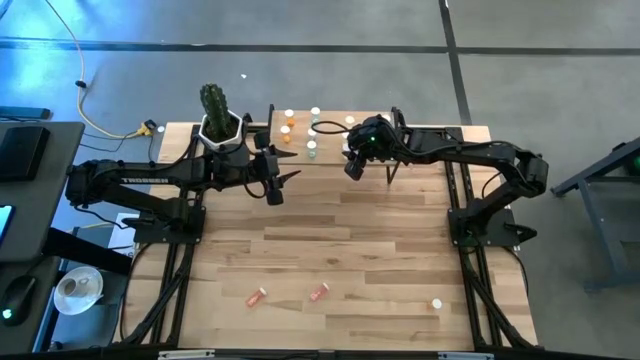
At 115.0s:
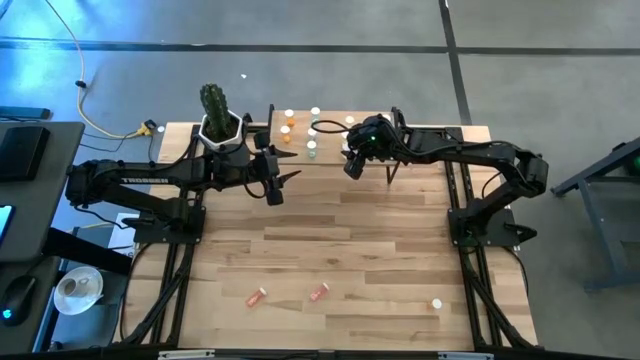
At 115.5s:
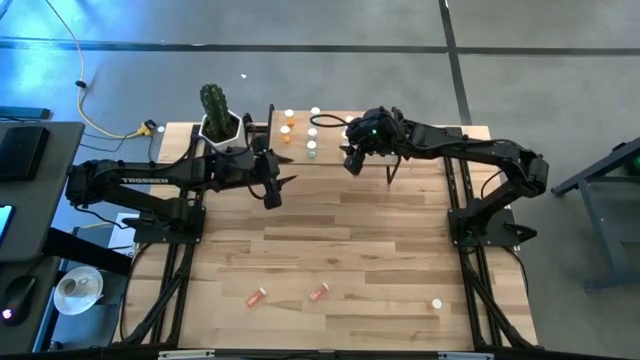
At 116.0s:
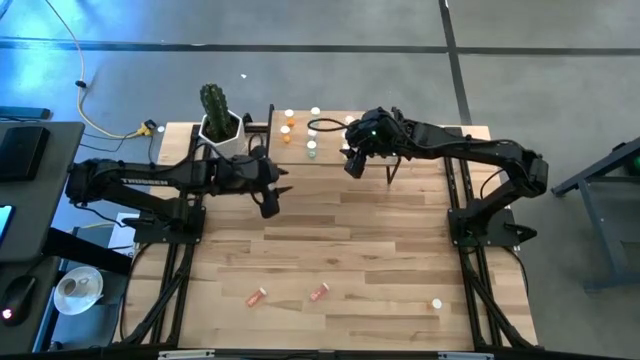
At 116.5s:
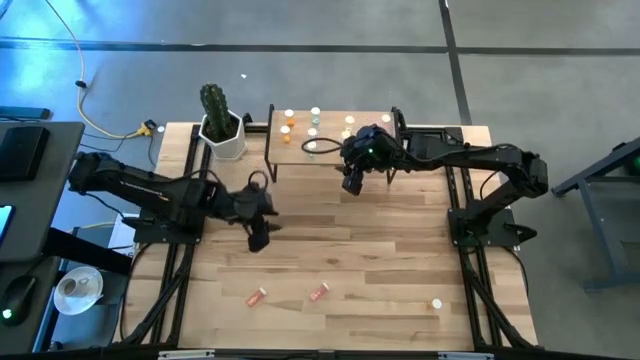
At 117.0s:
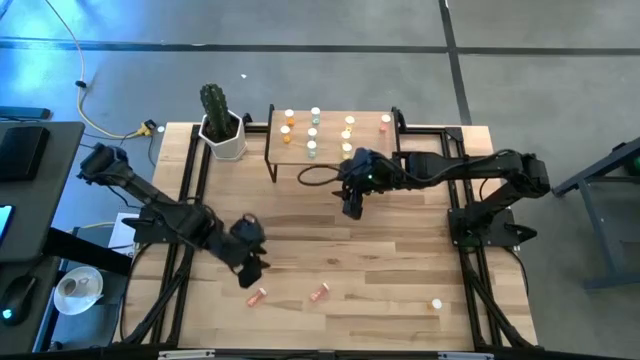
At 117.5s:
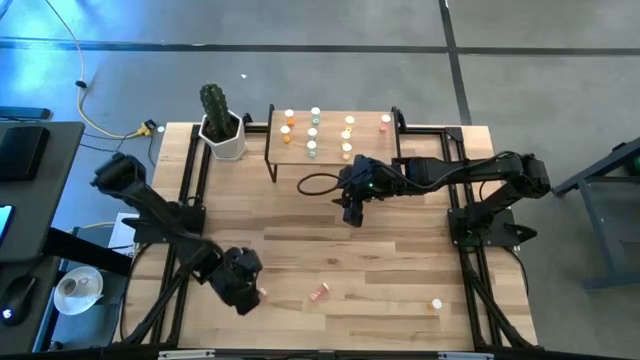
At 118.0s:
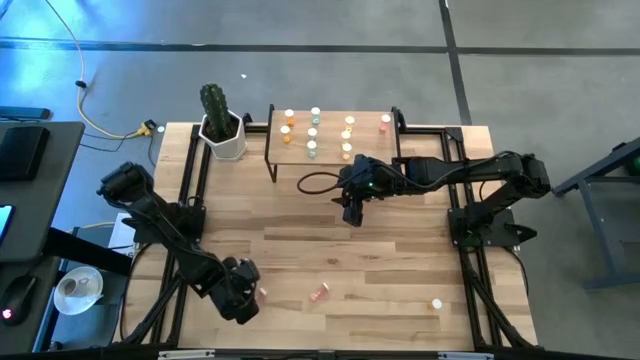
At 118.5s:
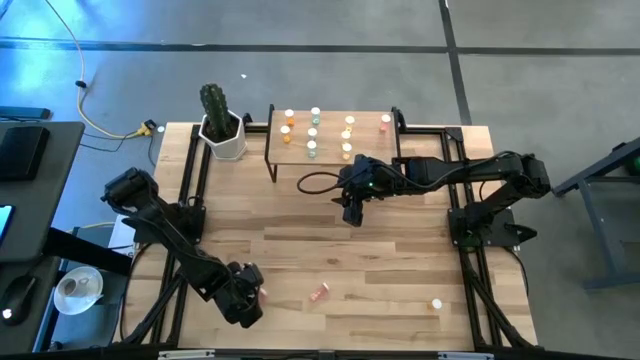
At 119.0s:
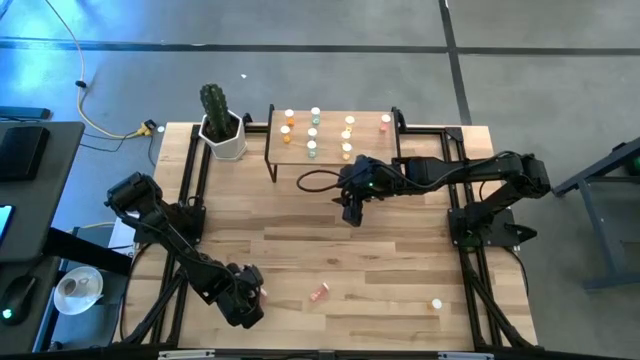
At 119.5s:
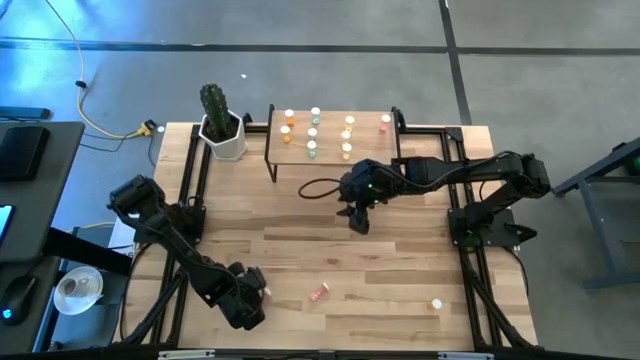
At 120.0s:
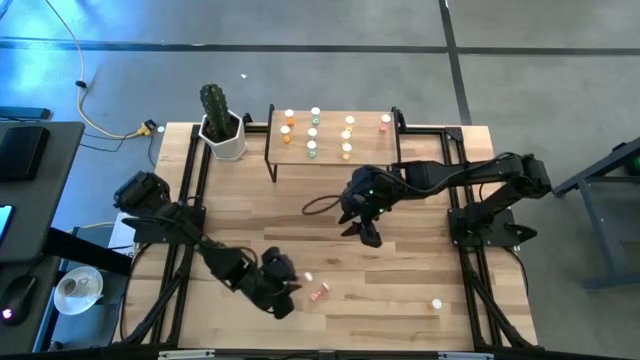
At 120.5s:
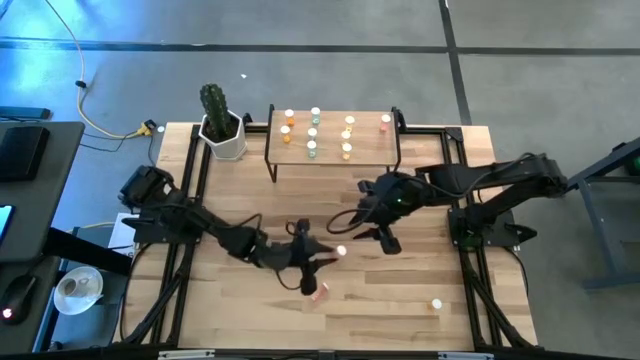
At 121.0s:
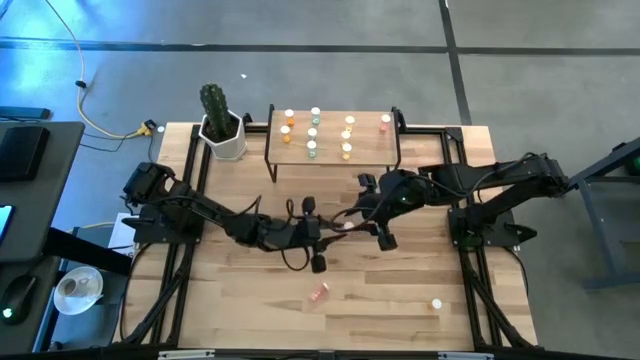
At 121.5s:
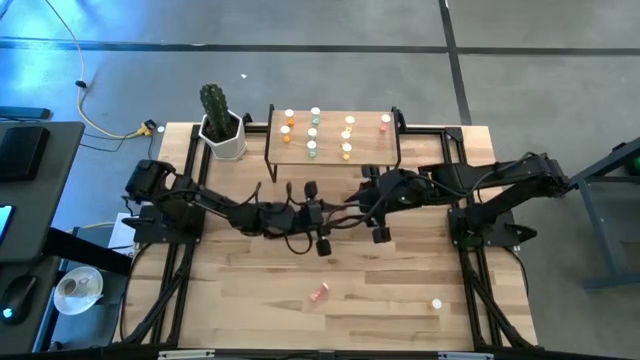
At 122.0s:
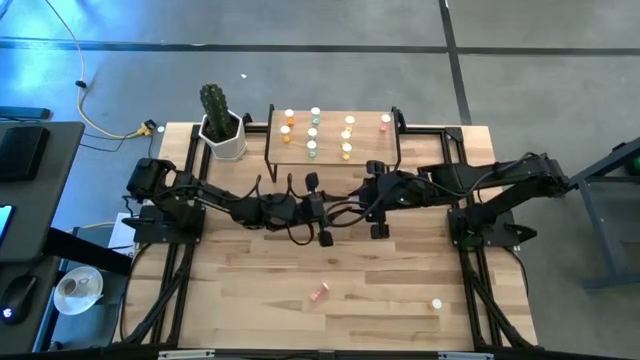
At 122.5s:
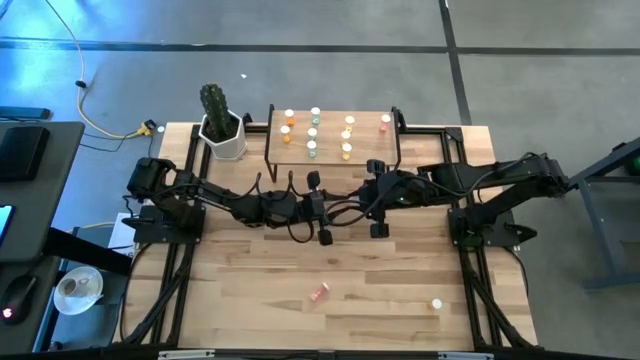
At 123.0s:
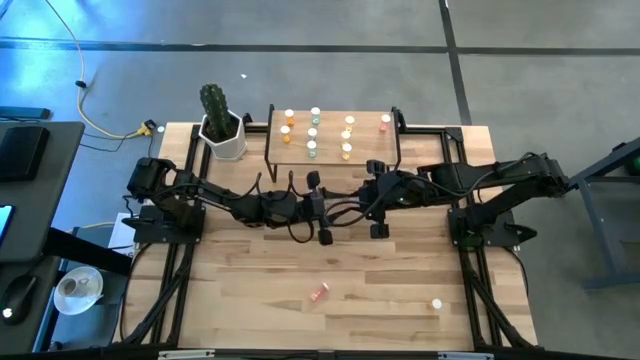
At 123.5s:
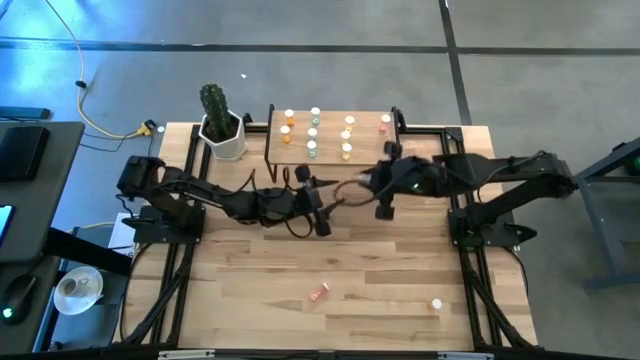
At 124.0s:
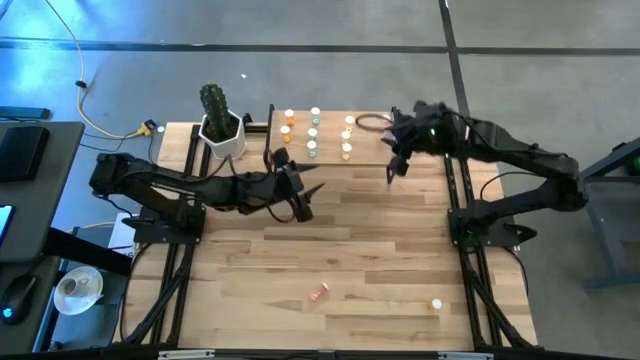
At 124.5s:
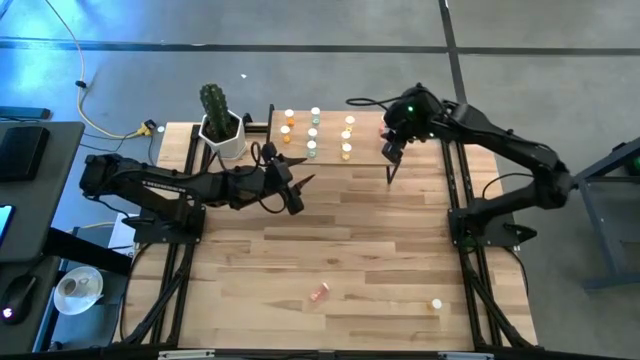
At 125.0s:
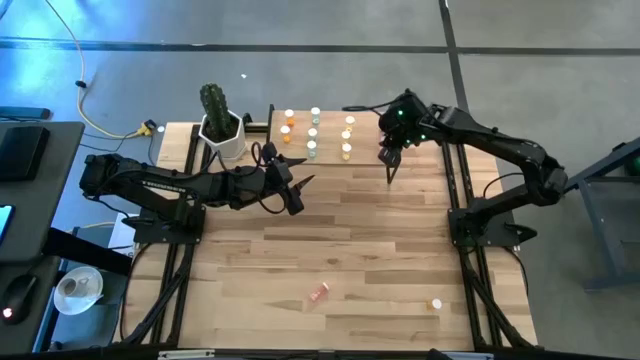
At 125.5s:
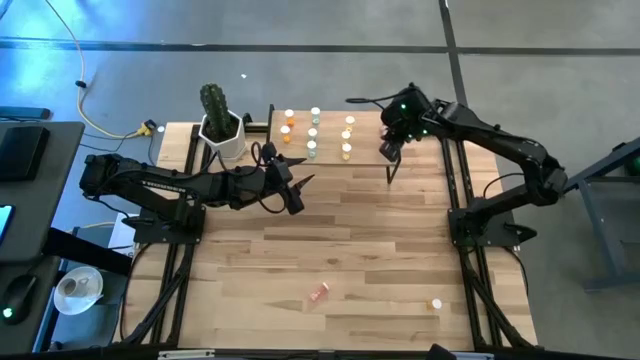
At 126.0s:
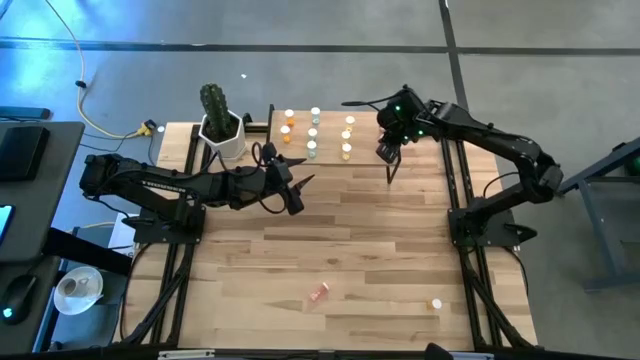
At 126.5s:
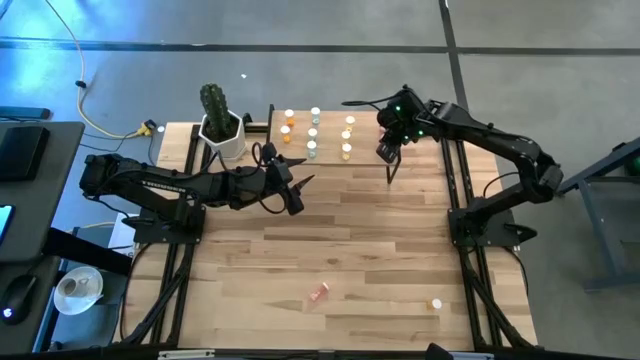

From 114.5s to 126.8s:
Task: Pick and place medicine bottles onto shelf by color
Put the left pink pill bottle on the shelf

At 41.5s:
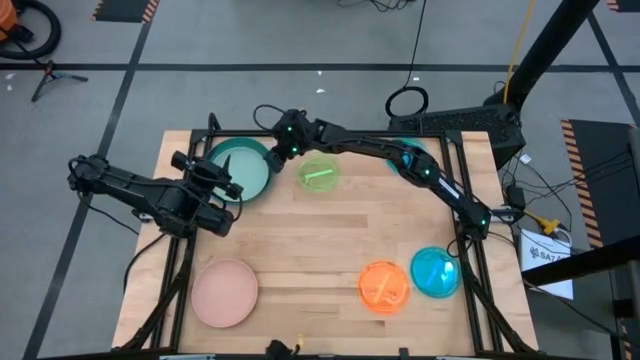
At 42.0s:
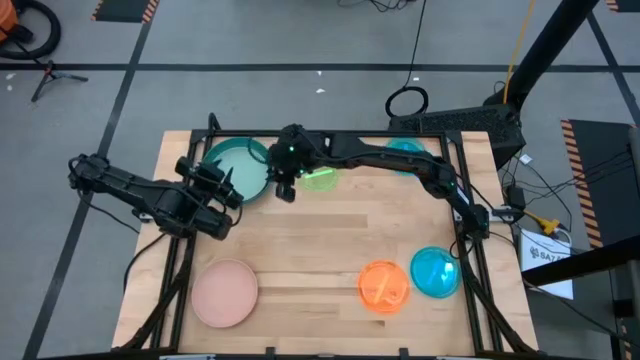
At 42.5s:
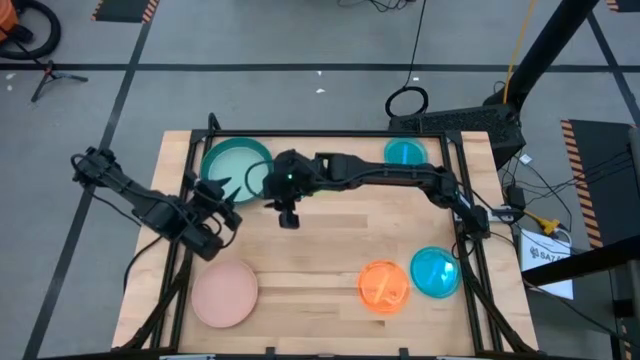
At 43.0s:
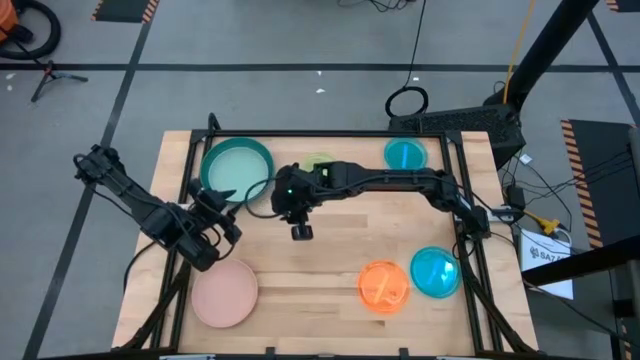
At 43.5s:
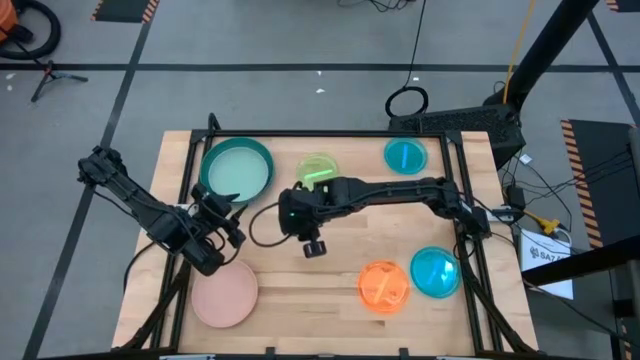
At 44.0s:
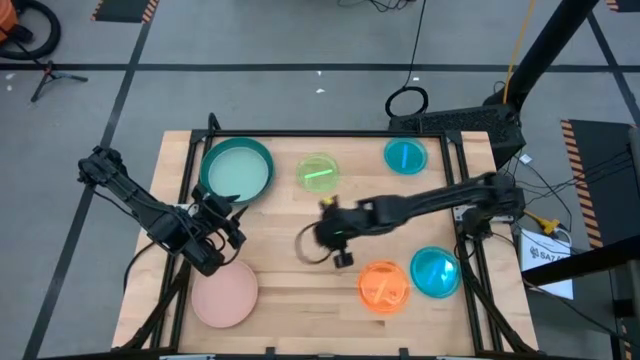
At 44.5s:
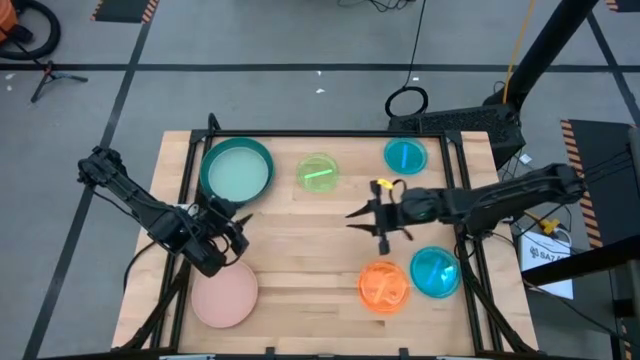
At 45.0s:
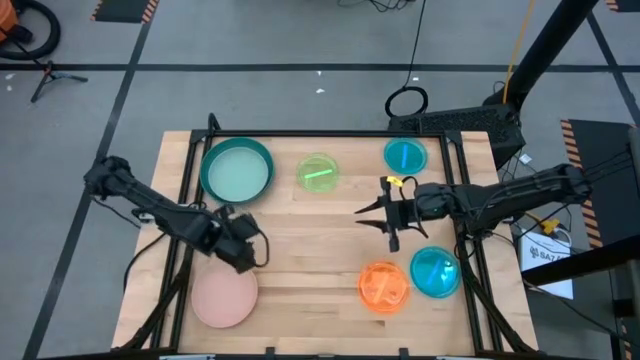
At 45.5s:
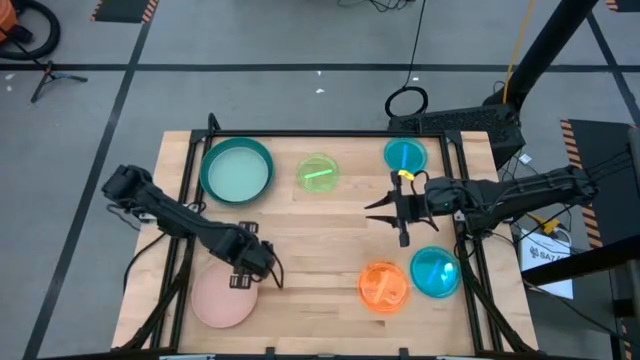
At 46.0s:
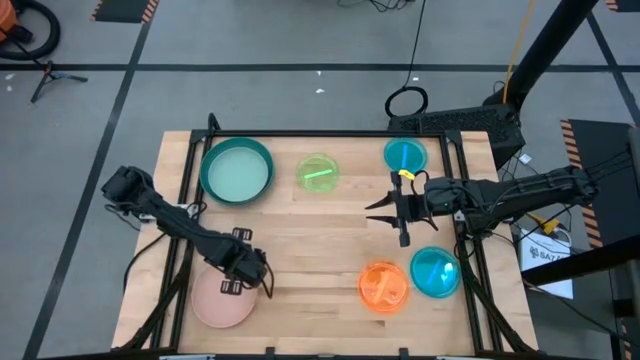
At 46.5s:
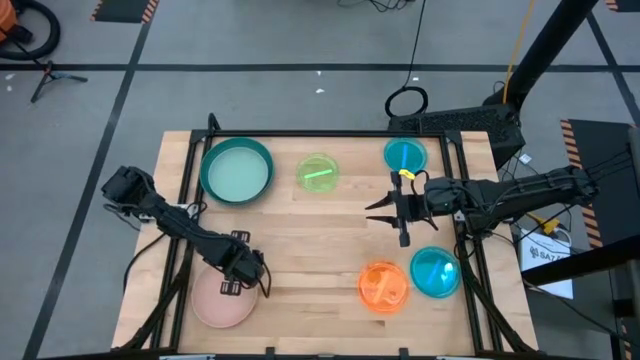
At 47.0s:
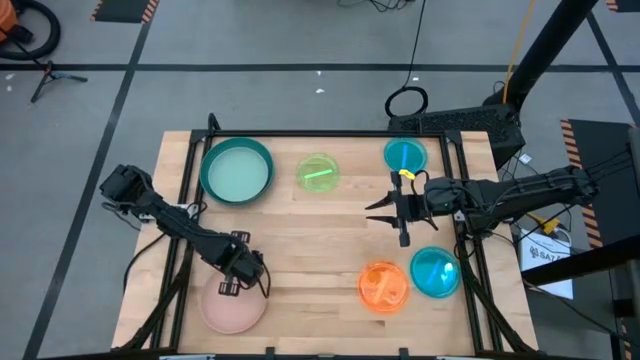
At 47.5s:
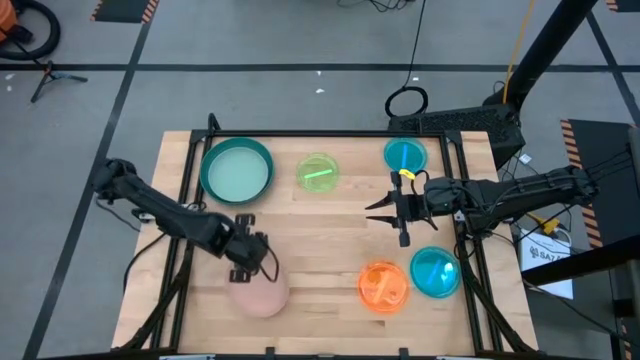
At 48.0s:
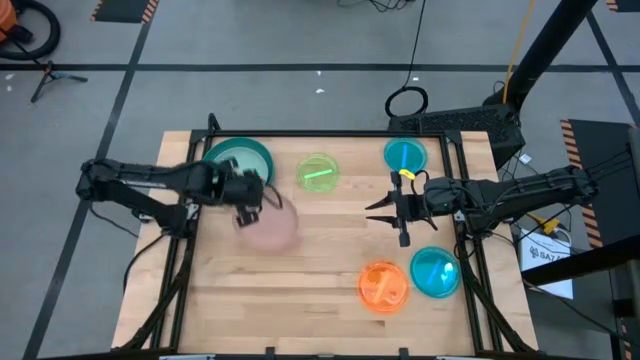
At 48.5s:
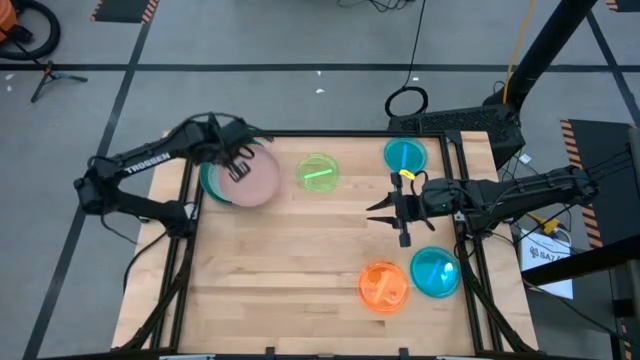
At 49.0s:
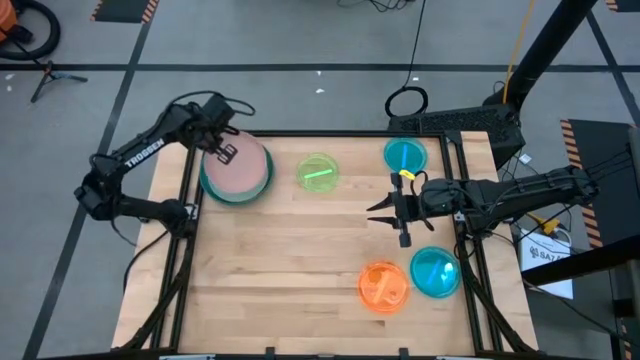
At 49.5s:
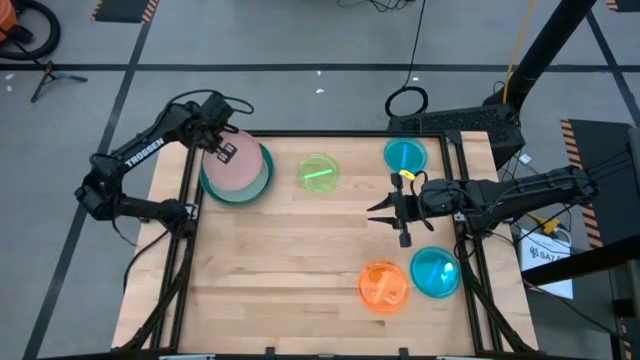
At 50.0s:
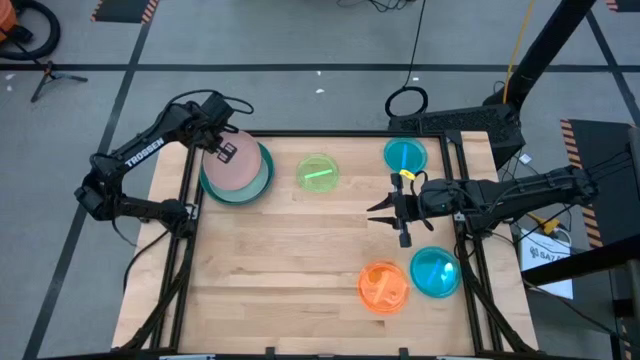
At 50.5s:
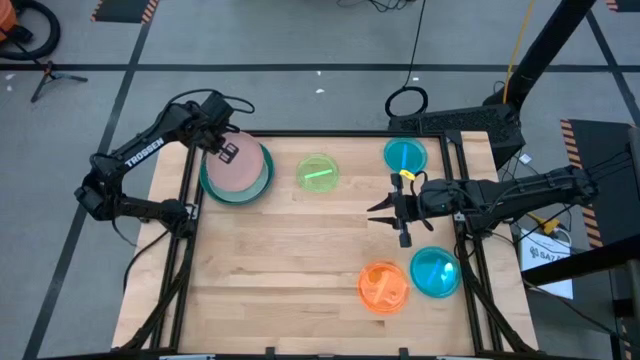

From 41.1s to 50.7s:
Task: Stack plastic plates
Stack the pink plate on top of the blue plate
